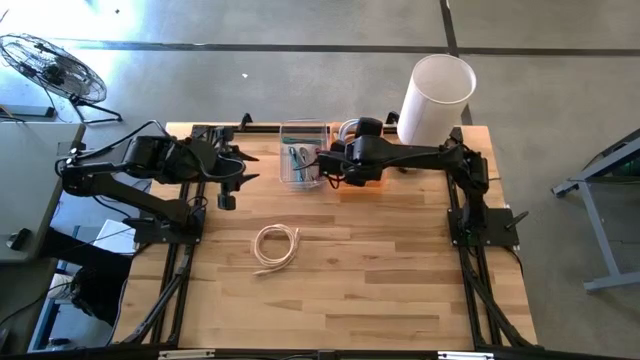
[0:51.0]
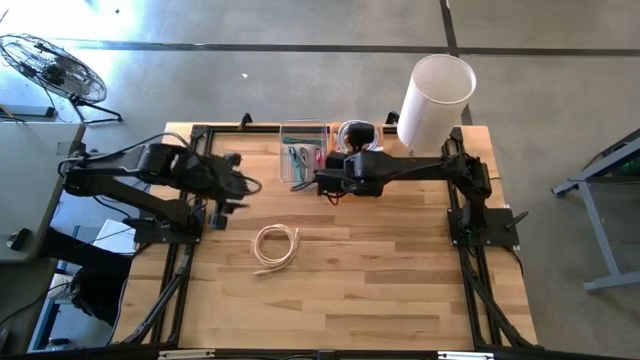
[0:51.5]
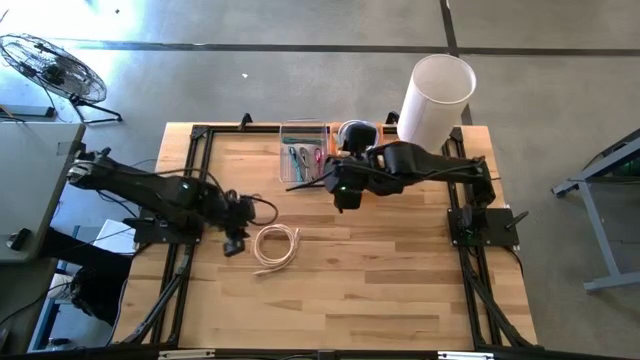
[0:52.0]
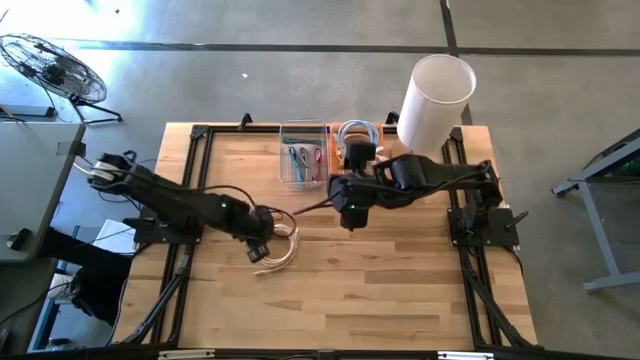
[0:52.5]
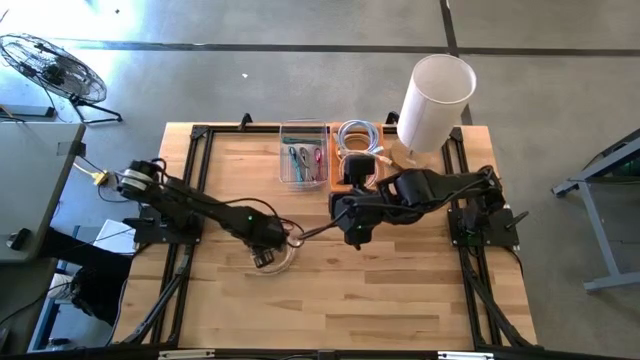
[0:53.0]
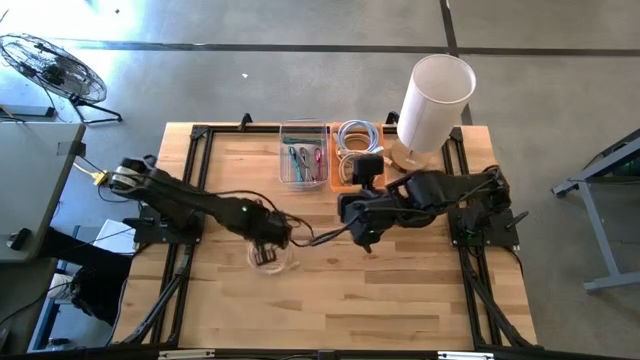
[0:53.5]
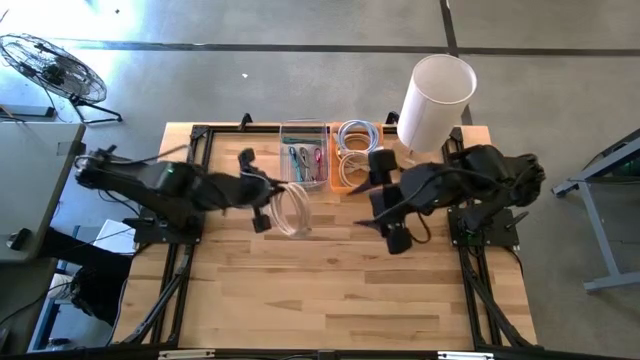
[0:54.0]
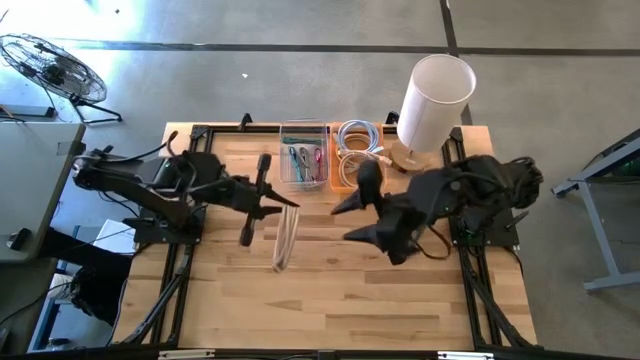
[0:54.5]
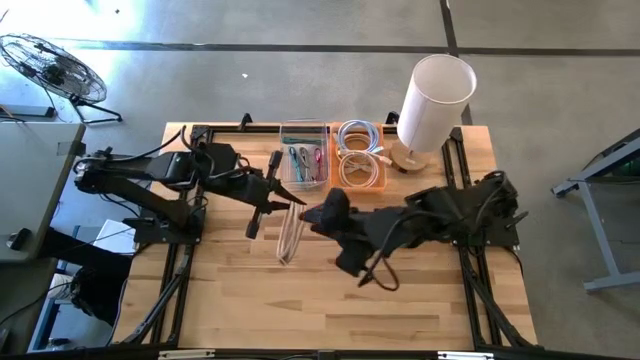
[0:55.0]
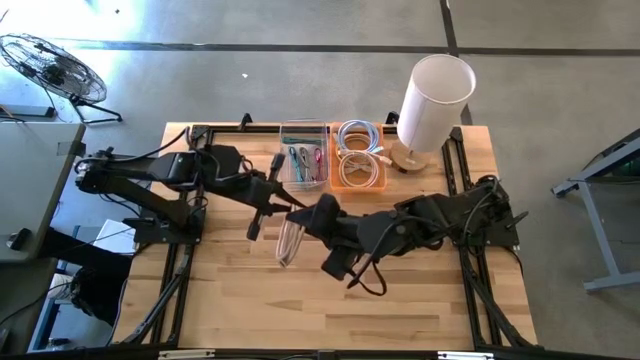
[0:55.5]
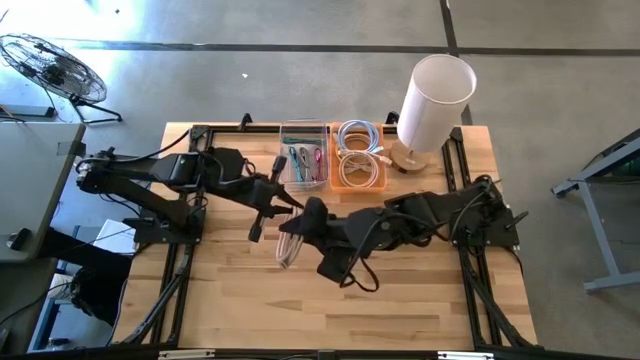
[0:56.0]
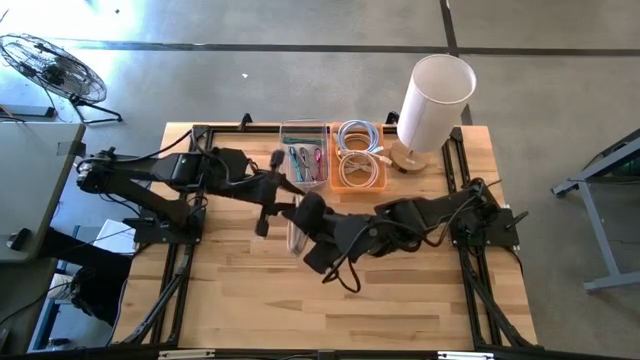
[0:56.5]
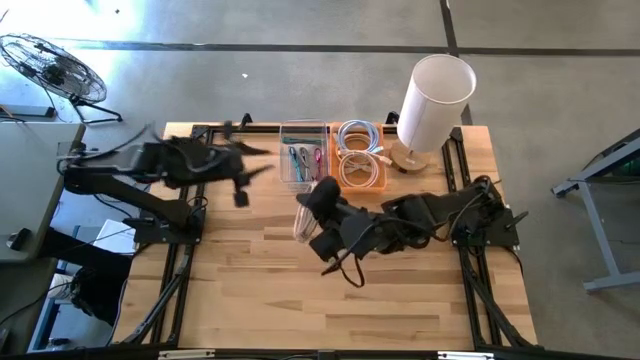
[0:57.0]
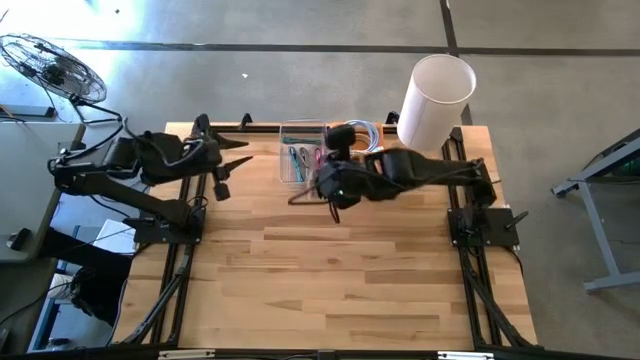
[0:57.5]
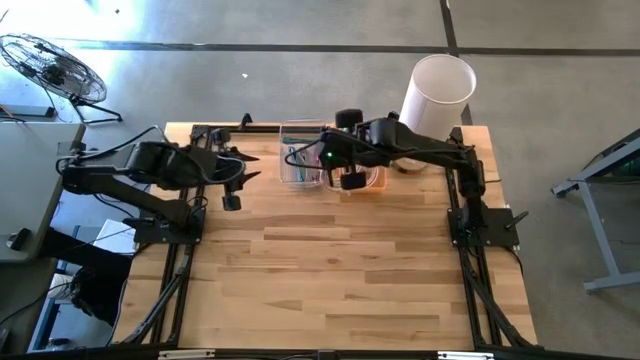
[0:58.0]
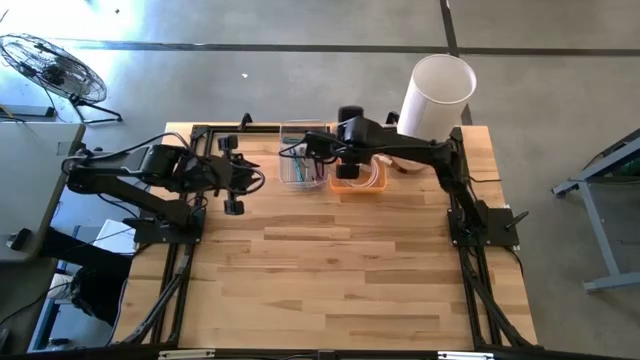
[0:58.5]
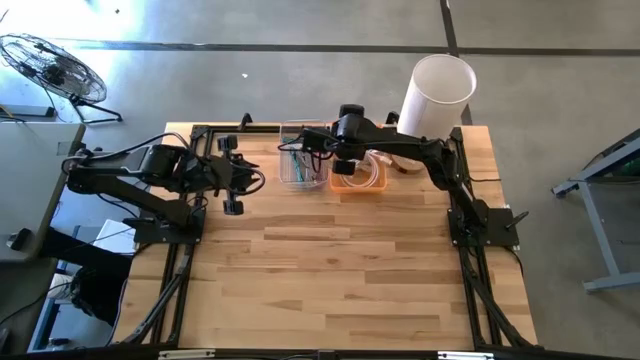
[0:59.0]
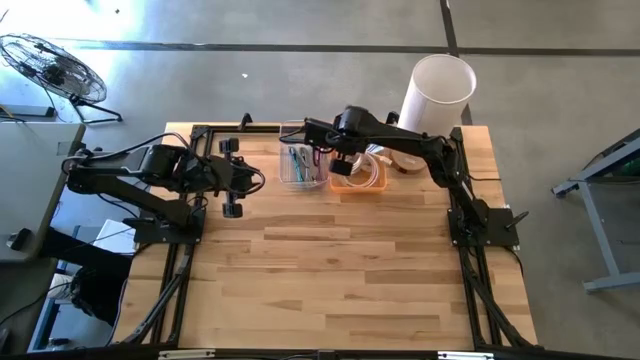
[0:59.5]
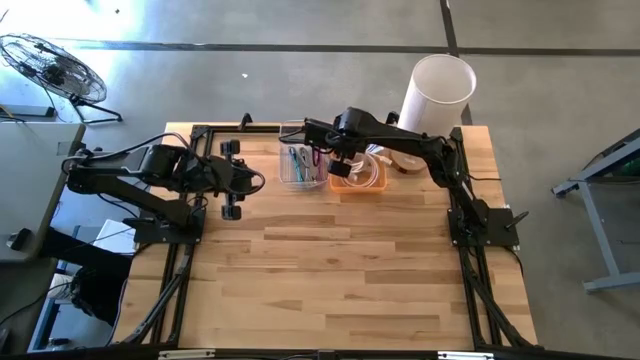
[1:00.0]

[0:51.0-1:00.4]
Task: Pick & Place USB Port
Put the light brown hdmi cable into the orange bin

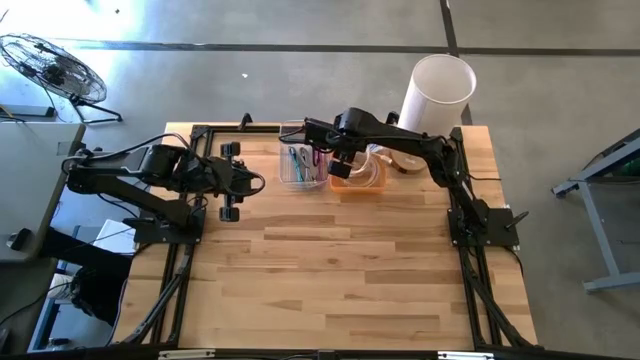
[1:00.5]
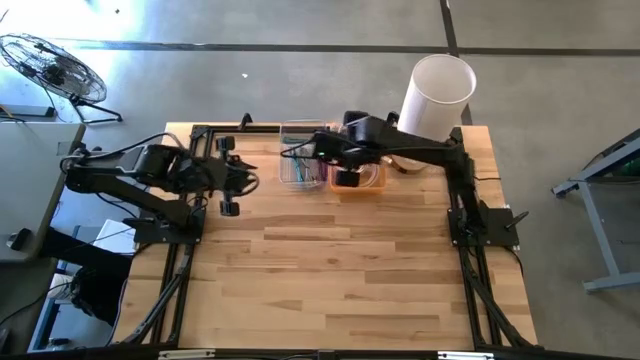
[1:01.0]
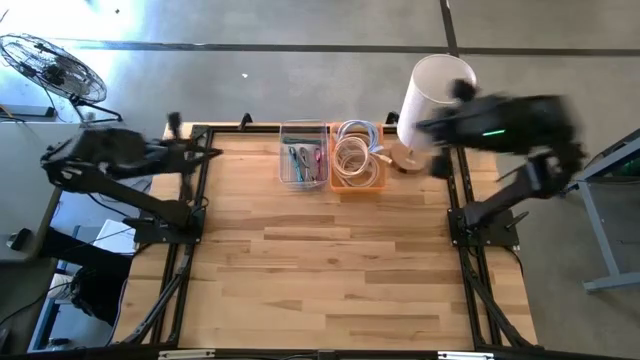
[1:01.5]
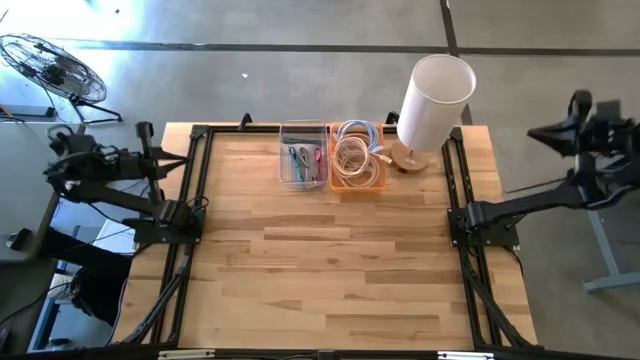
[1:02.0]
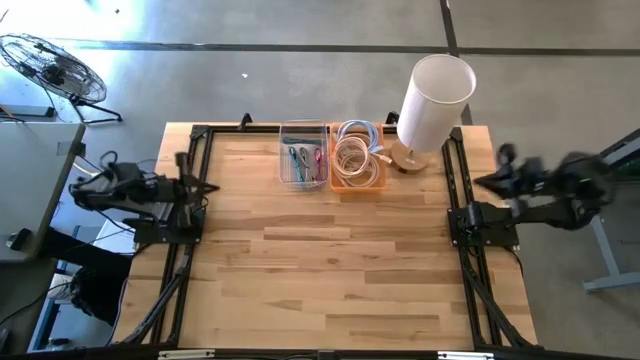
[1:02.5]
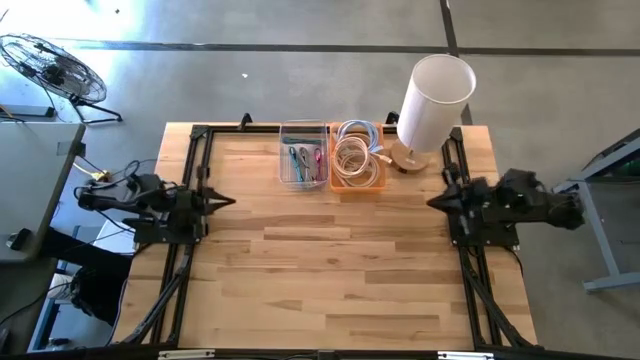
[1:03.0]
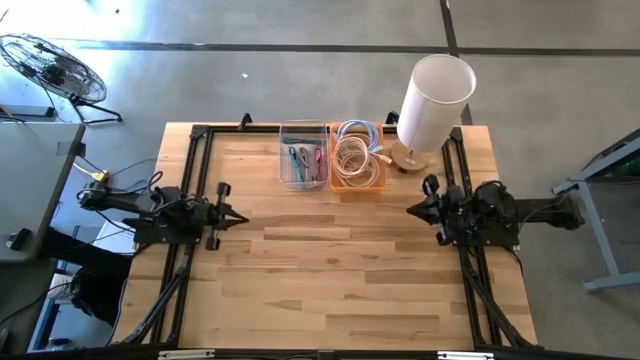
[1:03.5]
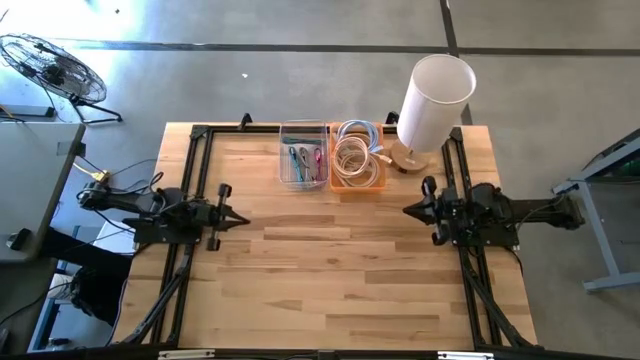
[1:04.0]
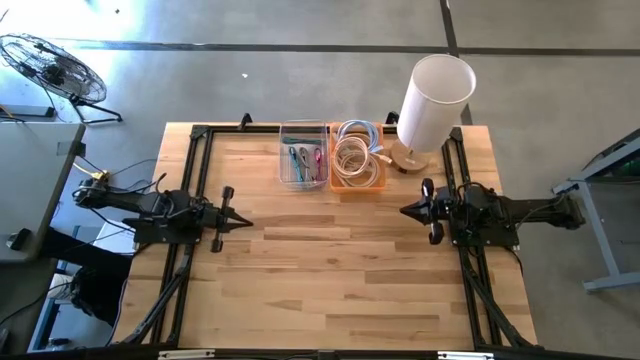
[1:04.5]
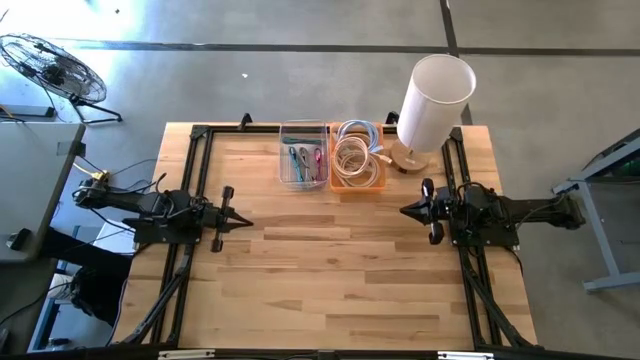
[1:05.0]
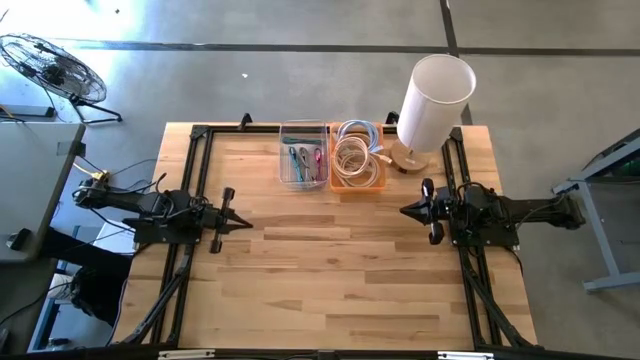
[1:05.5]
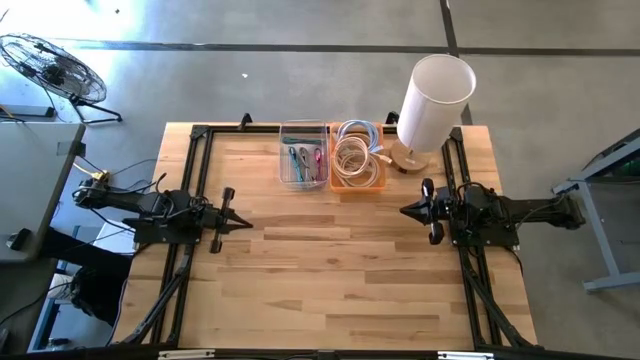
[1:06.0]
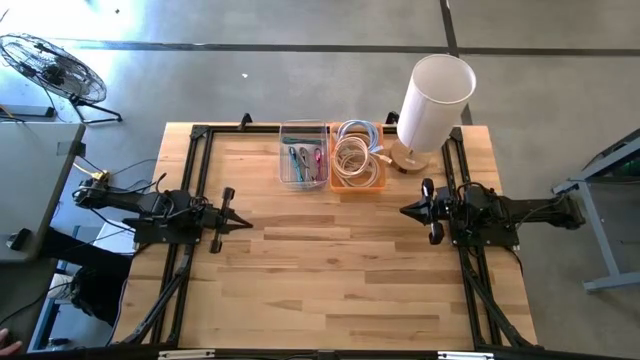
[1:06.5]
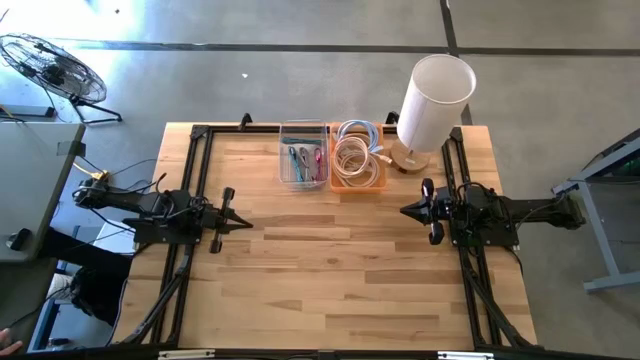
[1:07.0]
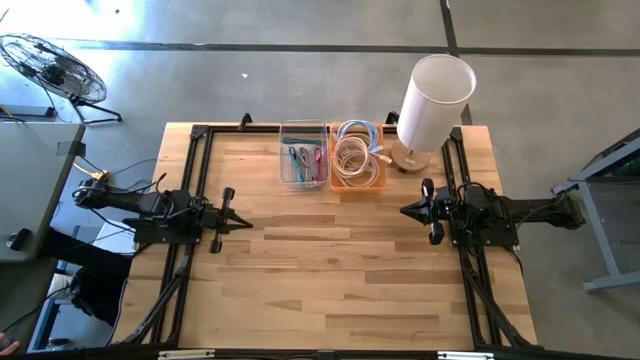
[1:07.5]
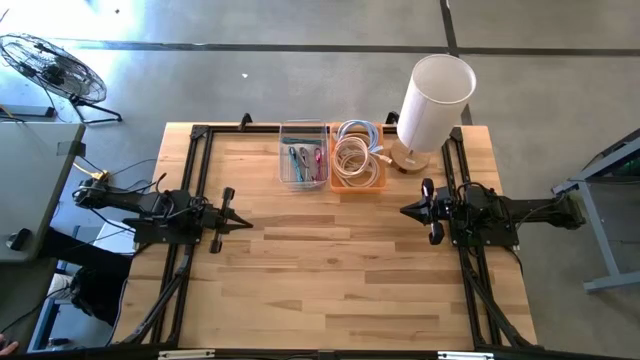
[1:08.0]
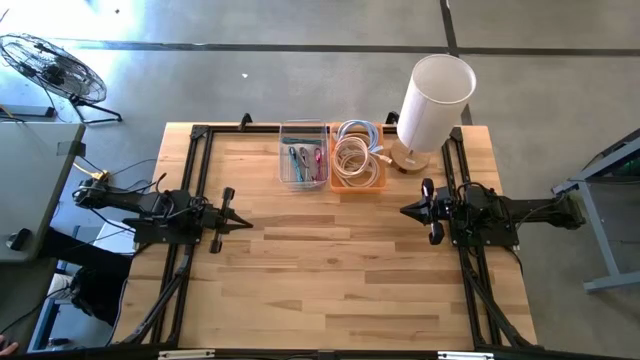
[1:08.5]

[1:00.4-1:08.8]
Return to Home Position

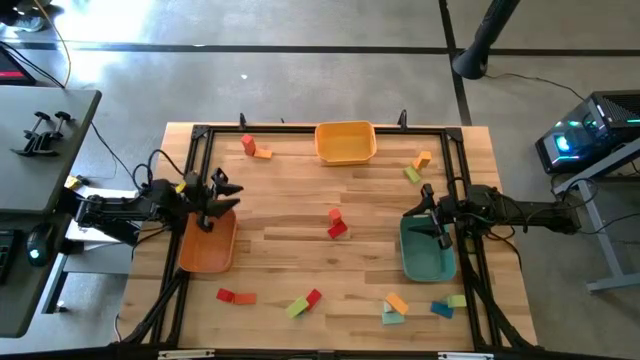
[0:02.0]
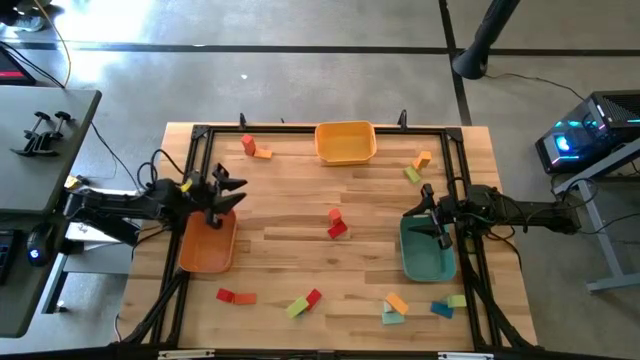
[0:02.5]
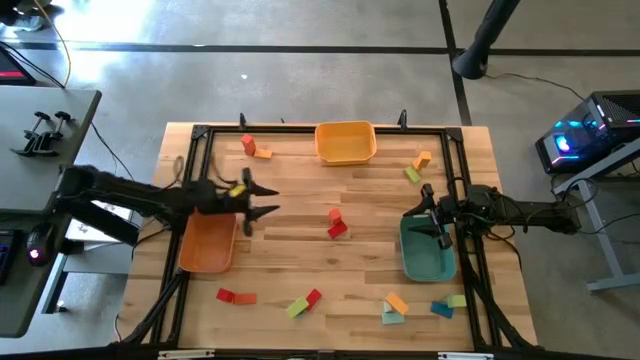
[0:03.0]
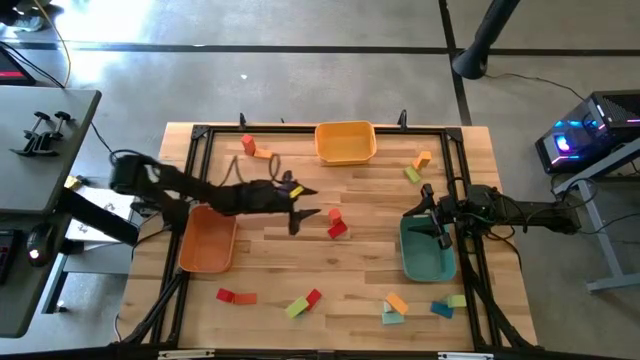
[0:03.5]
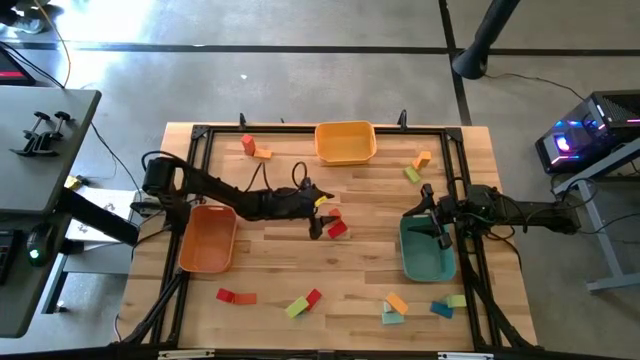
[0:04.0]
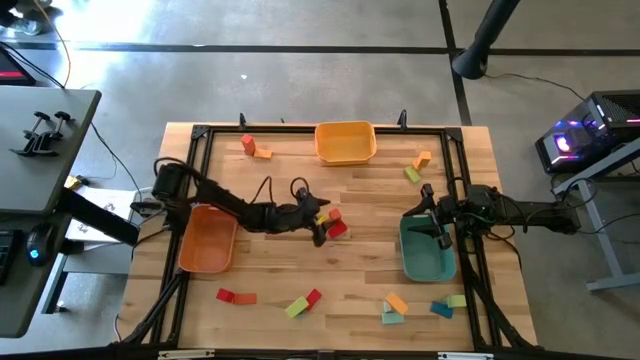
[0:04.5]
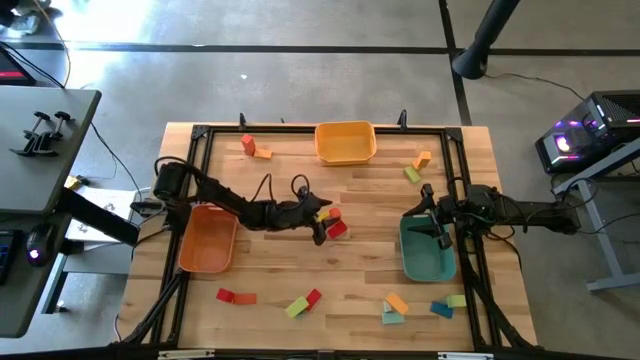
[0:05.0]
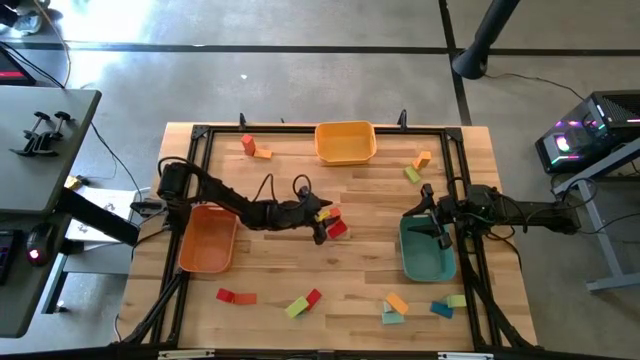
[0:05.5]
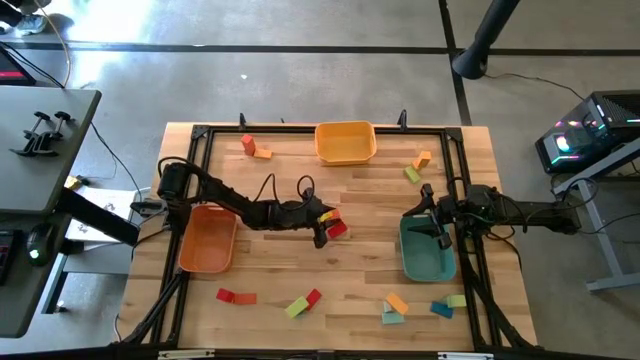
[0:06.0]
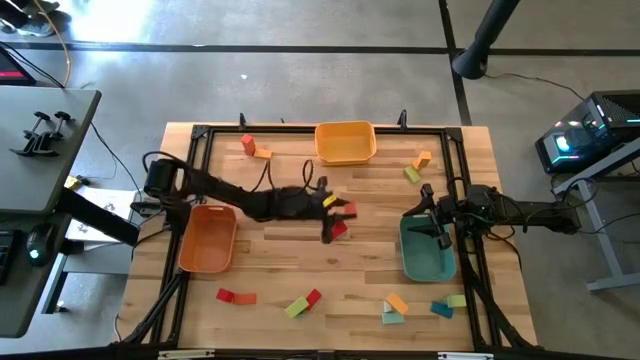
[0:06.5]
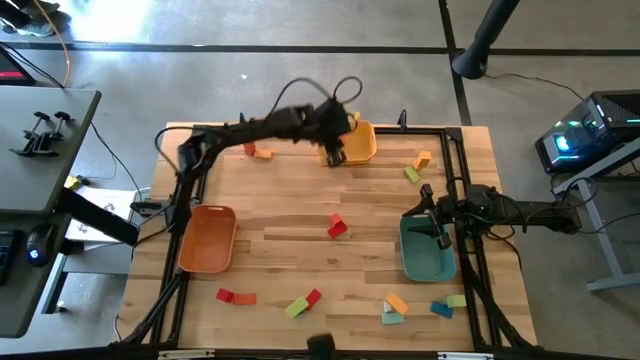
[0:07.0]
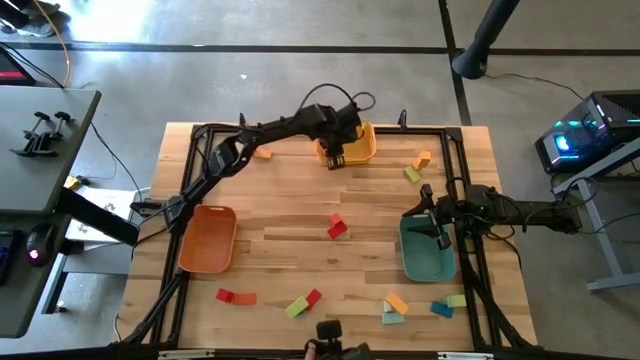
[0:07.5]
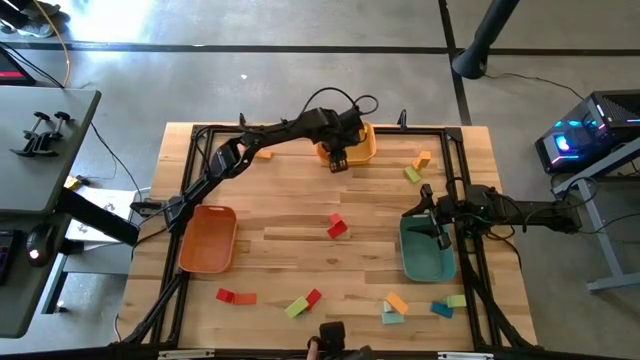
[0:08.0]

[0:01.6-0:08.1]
Task: Sort blocks by size
Put the orange large block into the yellow bin
